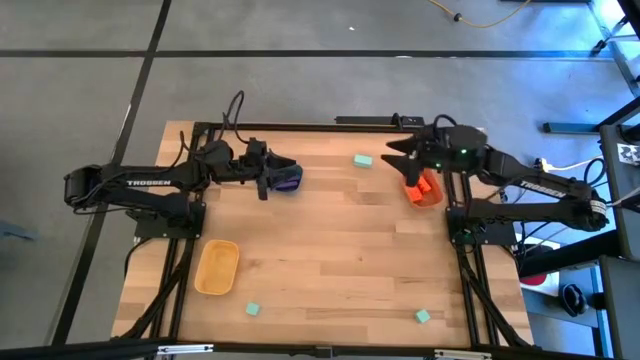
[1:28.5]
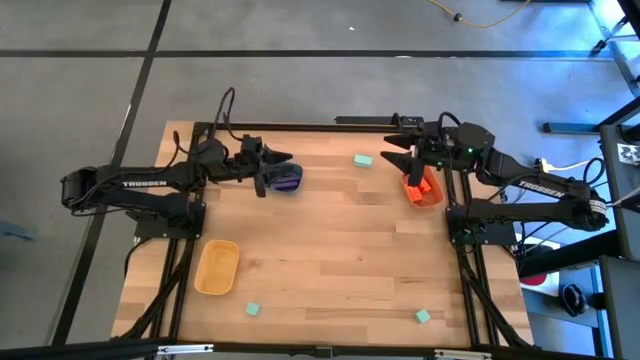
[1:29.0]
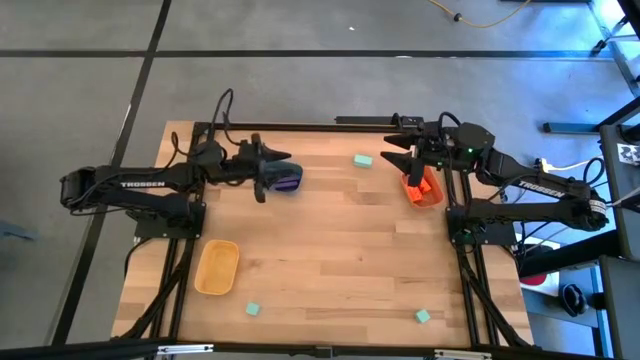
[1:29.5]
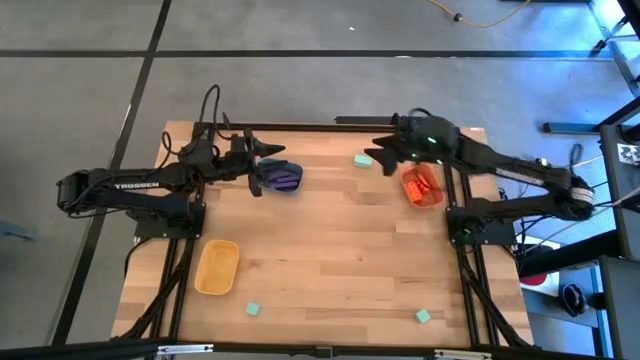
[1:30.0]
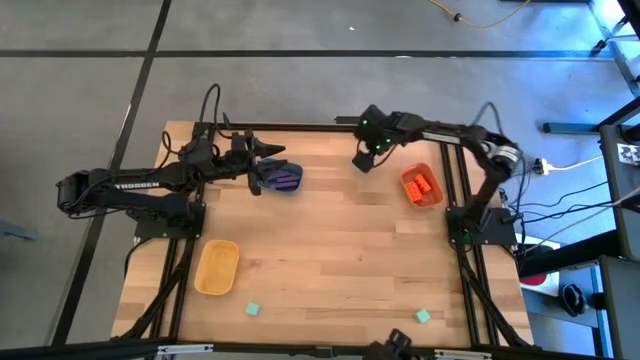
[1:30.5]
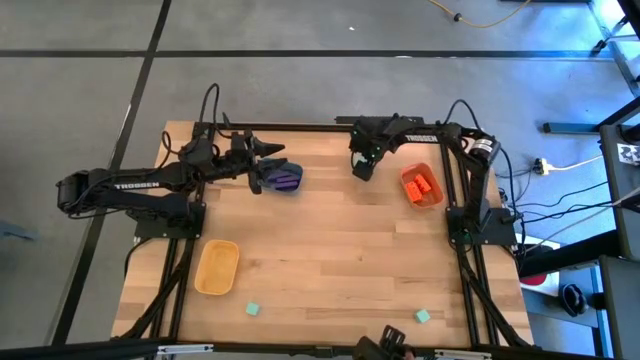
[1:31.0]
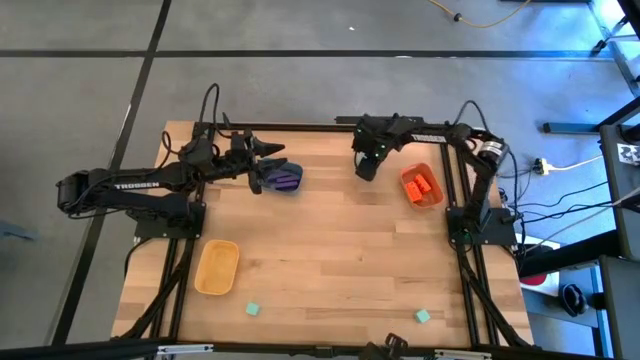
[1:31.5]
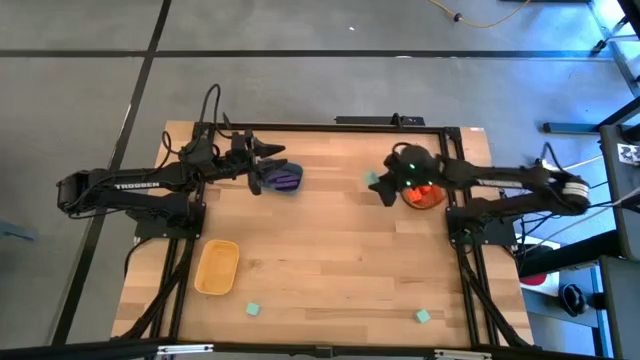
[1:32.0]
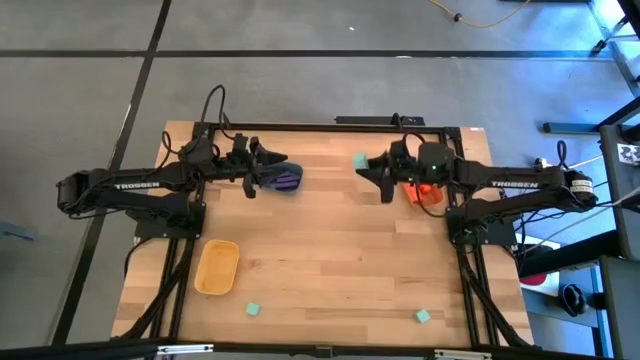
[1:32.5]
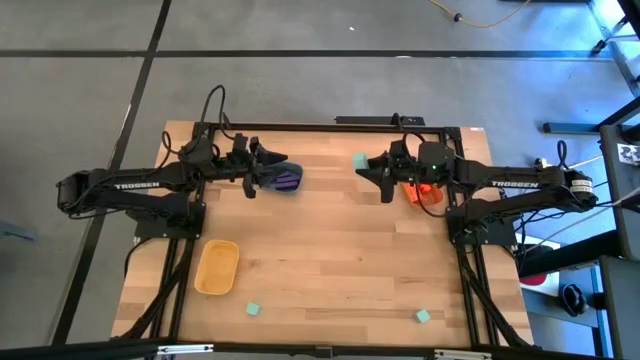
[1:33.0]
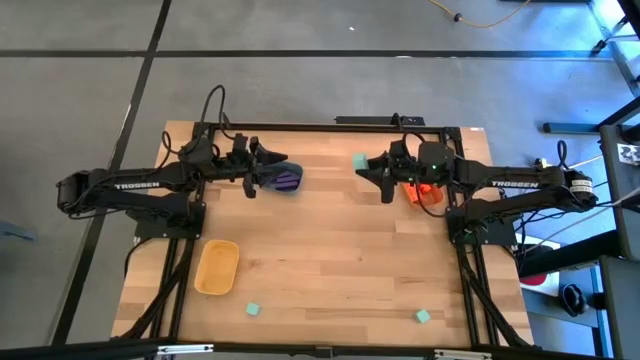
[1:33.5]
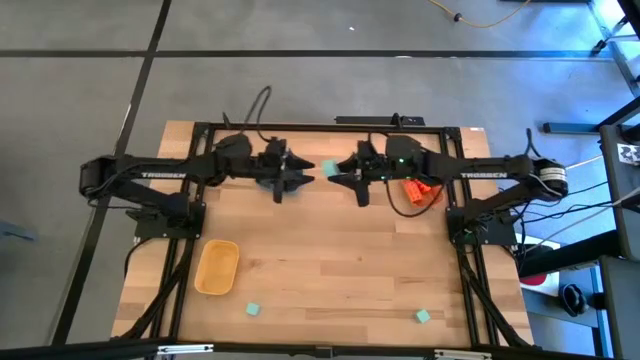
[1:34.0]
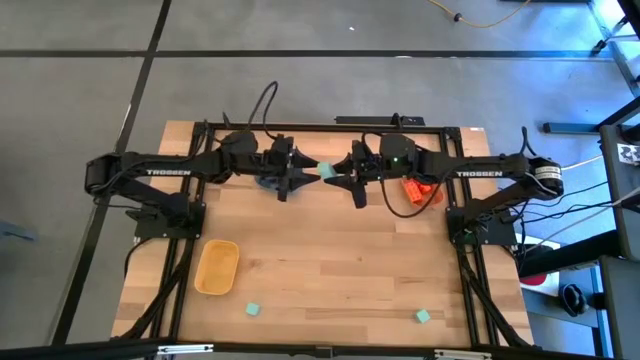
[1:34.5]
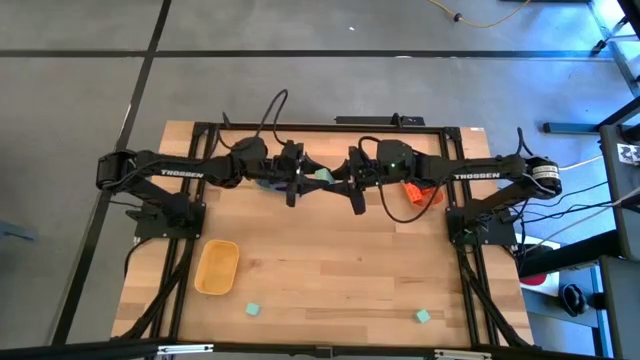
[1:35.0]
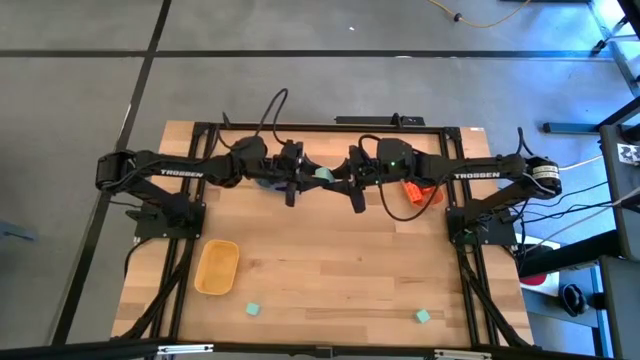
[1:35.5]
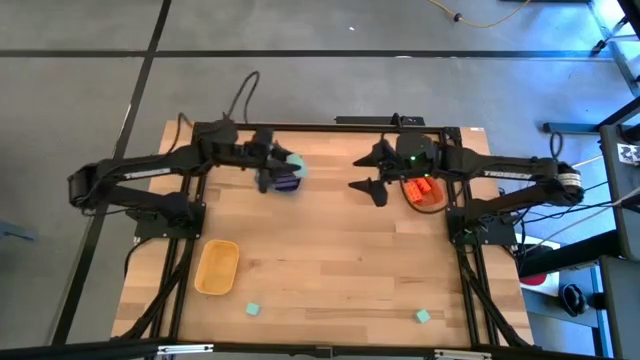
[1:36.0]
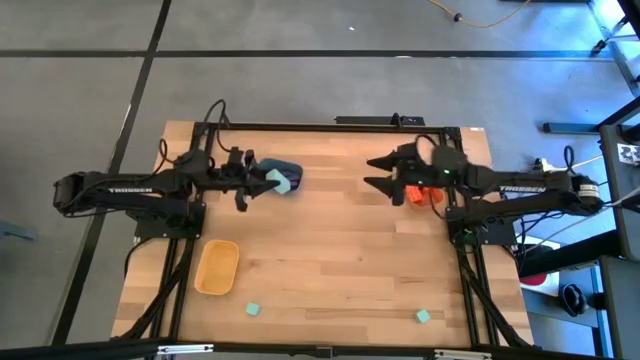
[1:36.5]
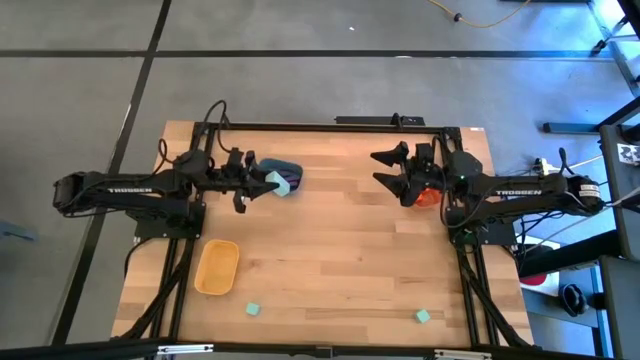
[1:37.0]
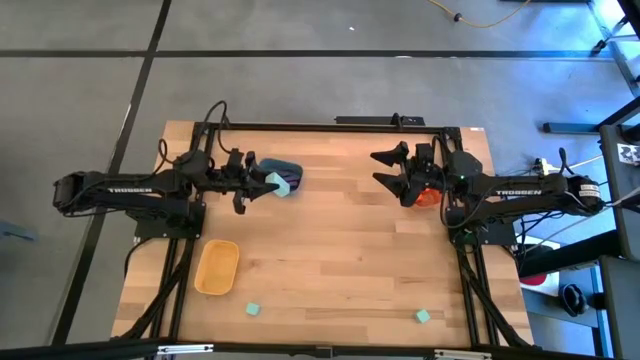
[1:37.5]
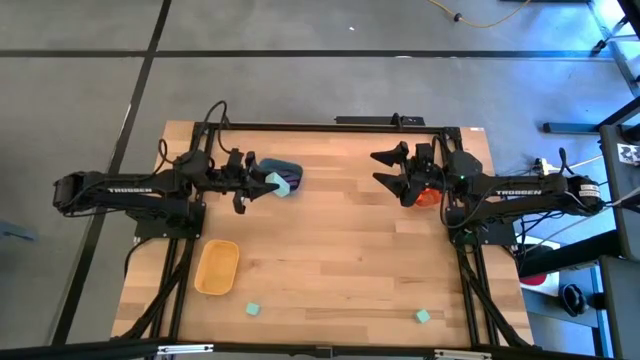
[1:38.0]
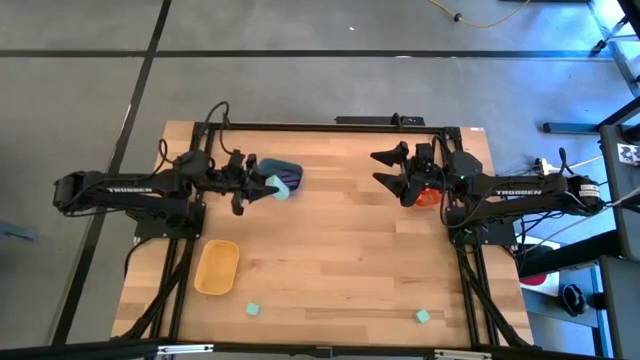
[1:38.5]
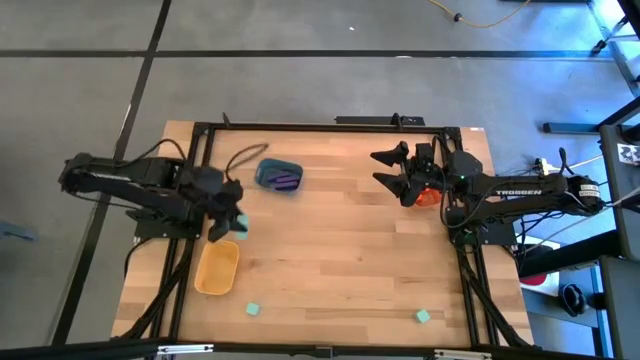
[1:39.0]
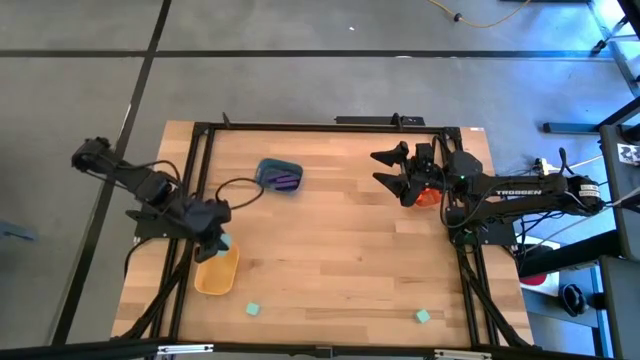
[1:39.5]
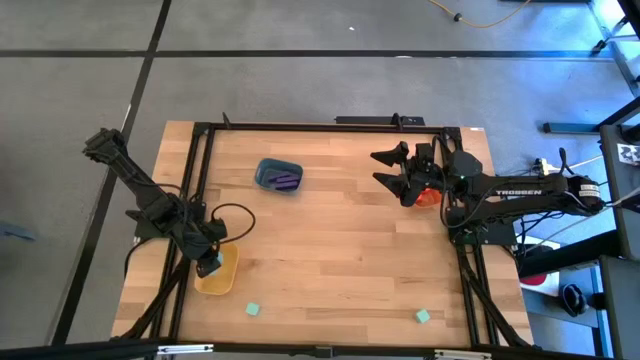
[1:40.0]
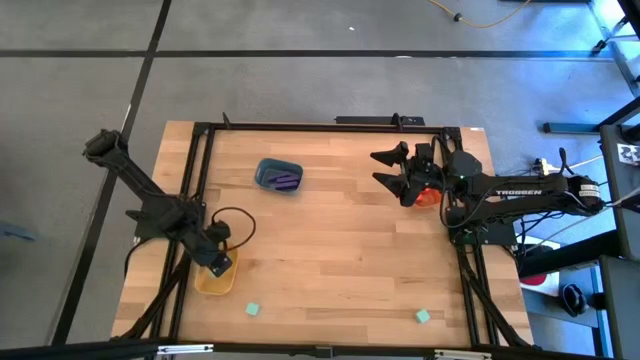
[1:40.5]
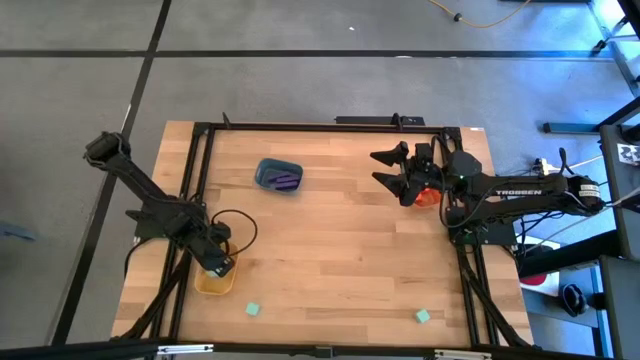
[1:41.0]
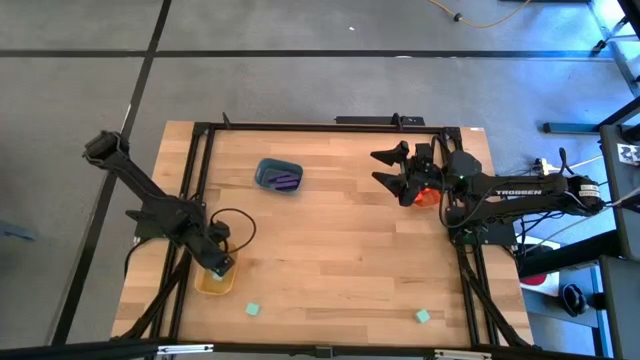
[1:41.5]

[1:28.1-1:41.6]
Task: Sort & place blocks by color
Put the top center blue block into the yellow bin
